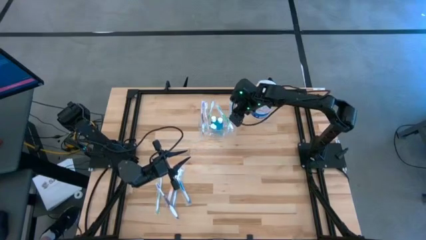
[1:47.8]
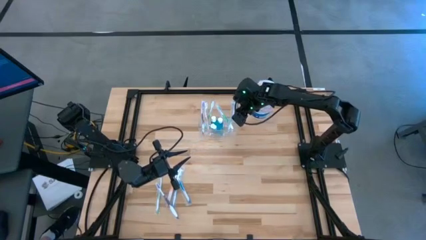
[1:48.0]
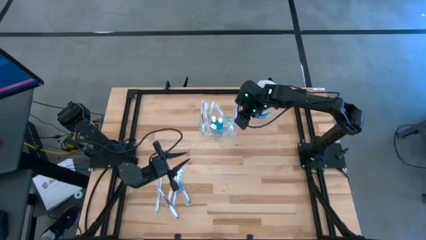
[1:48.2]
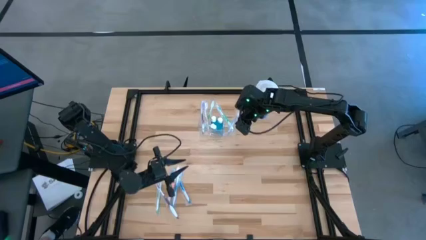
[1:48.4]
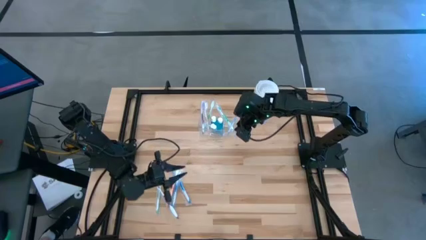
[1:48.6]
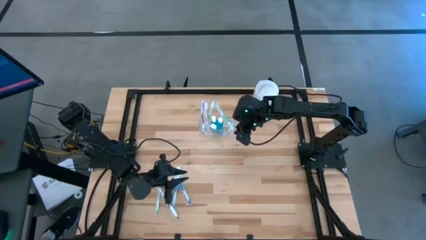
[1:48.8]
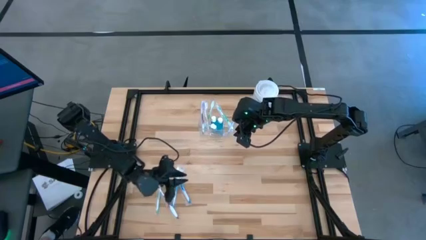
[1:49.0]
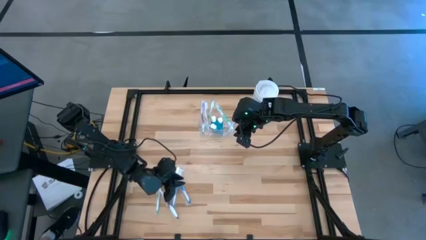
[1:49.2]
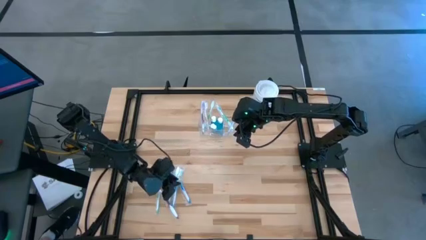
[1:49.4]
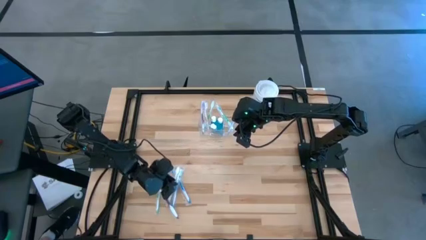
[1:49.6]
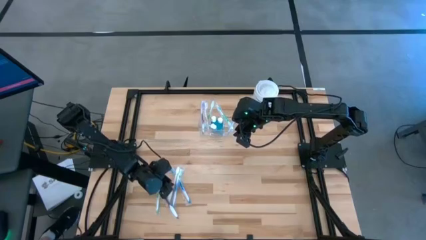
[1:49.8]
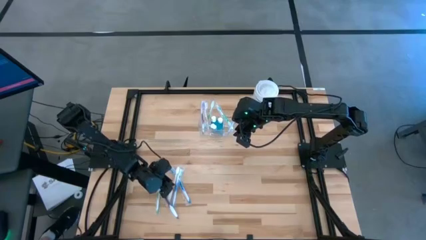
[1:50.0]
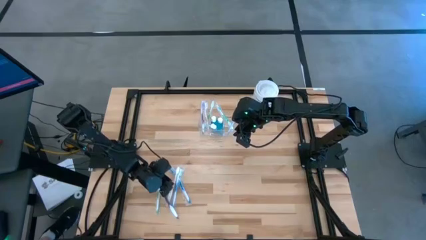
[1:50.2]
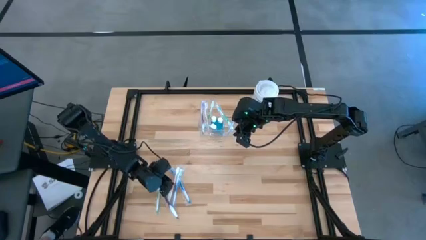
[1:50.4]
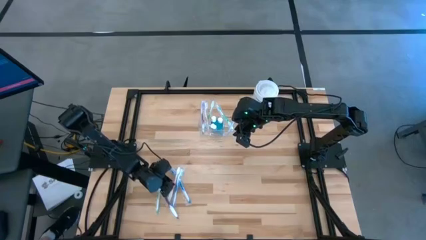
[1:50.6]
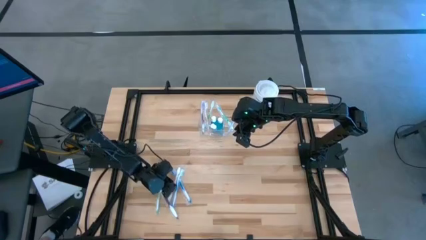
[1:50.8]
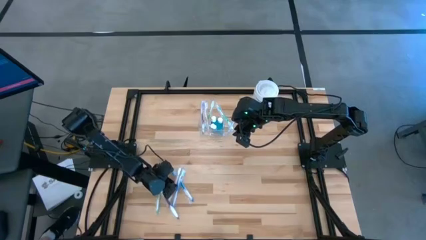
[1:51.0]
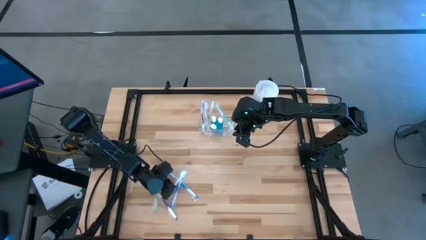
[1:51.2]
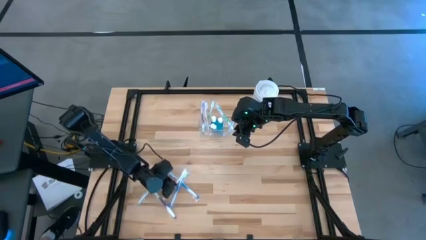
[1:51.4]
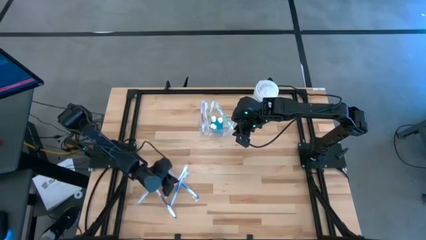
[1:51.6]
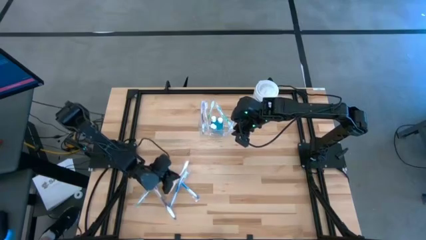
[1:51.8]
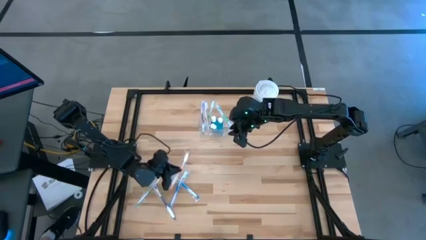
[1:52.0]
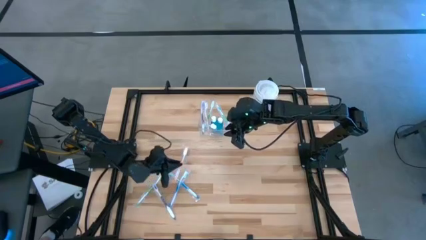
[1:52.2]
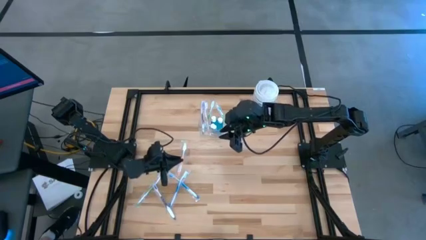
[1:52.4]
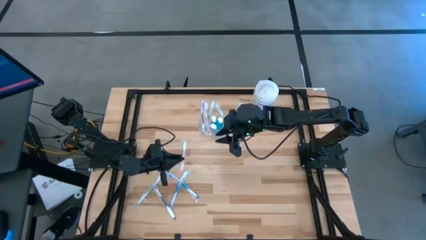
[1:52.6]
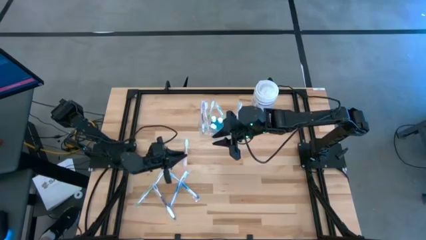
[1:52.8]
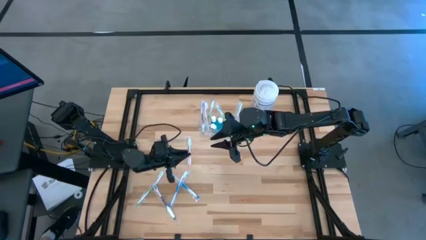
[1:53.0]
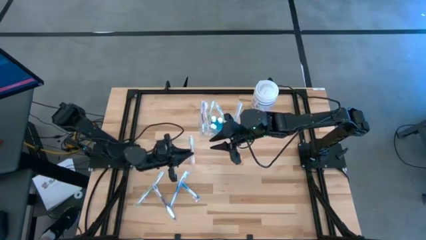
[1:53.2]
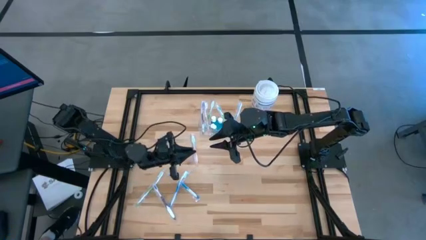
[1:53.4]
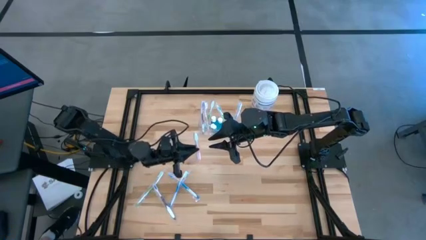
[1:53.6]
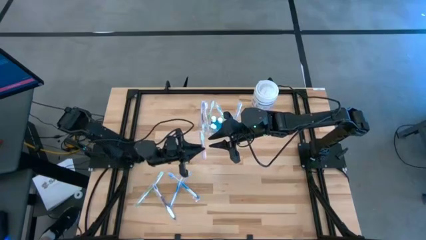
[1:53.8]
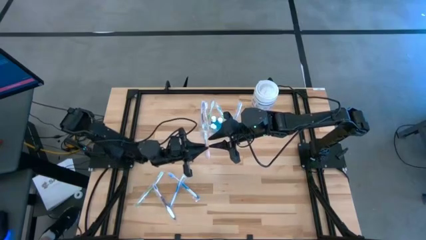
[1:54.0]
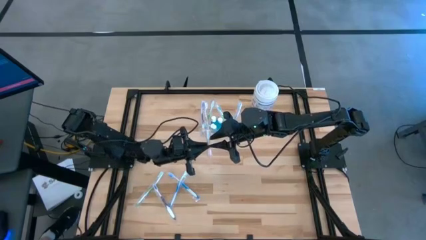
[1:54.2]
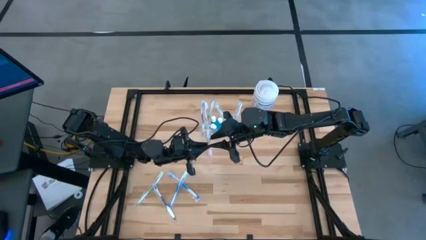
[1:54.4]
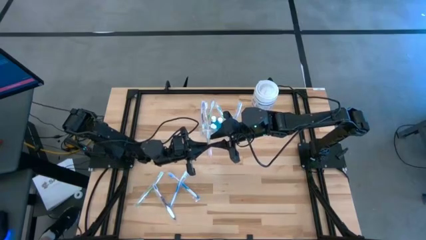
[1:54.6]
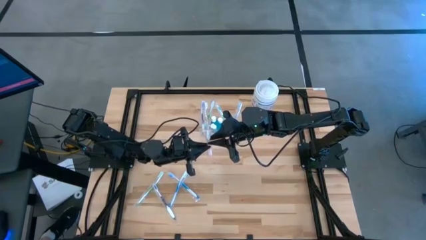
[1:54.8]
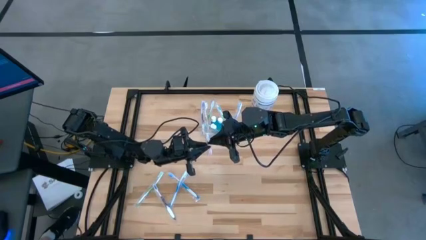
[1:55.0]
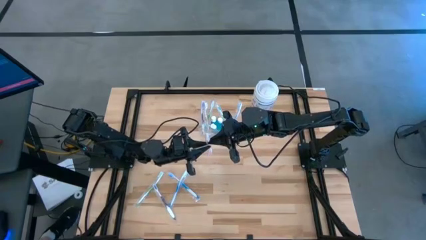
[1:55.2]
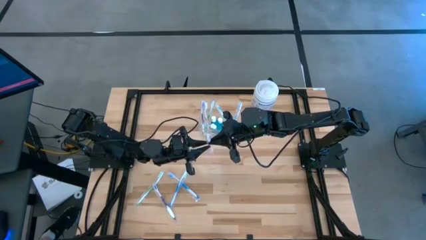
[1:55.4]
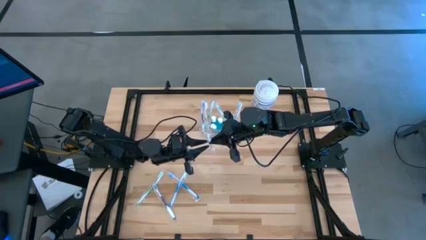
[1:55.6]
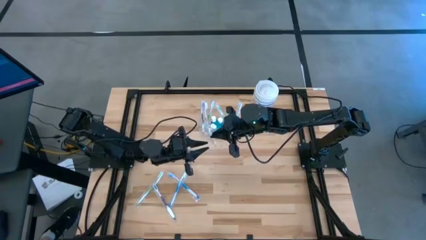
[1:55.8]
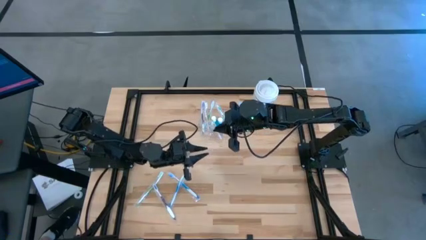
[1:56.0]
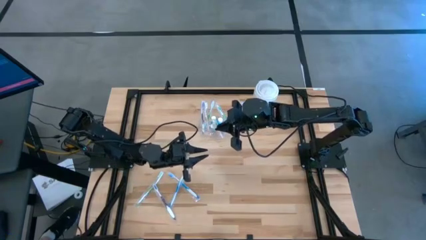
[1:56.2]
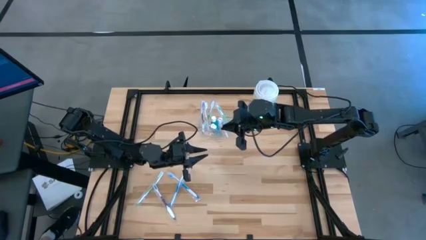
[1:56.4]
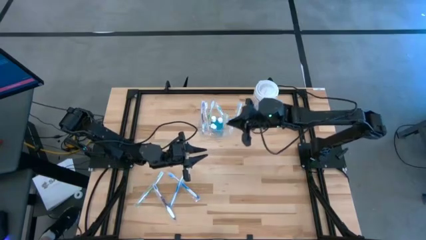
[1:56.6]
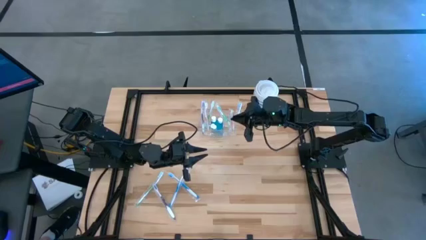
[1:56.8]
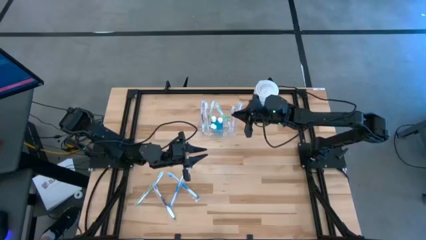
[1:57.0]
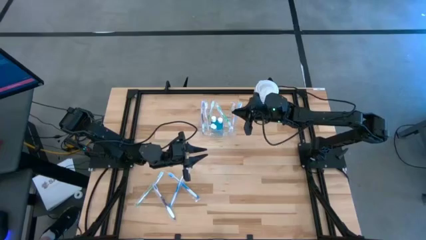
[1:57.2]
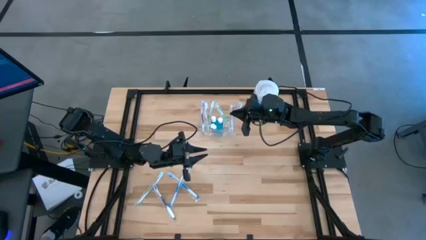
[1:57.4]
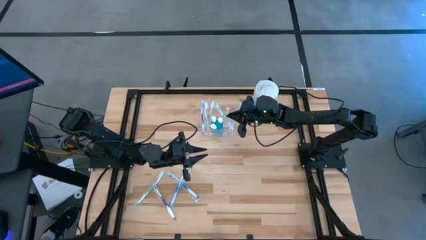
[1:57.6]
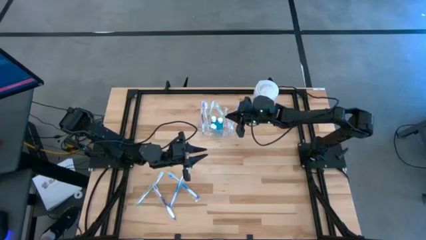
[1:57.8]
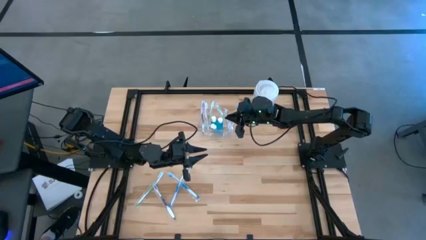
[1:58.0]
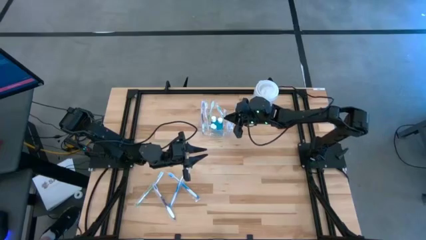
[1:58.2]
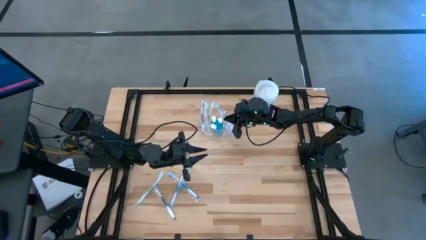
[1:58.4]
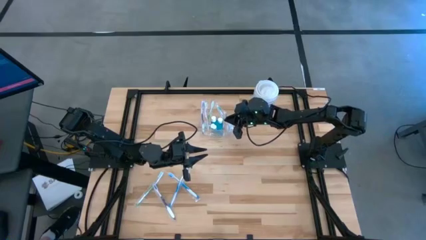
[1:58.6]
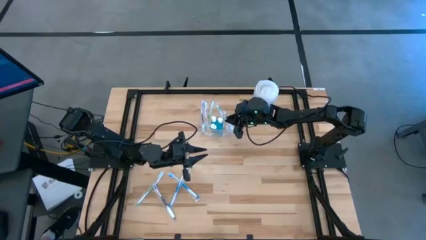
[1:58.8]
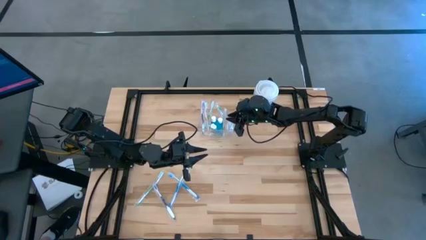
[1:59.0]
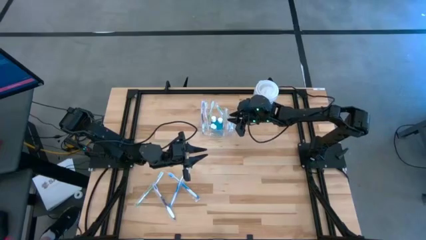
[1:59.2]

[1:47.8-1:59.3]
Task: Pick & Place toothbrushing station
Put the orange toothbrush into the transparent organizer

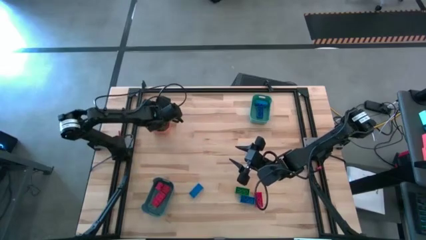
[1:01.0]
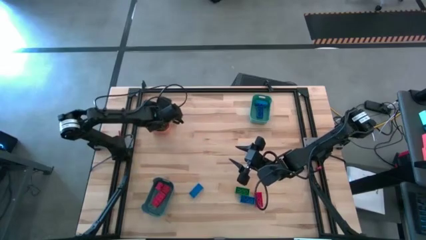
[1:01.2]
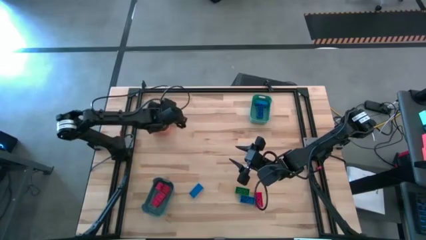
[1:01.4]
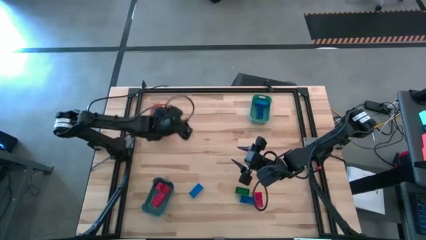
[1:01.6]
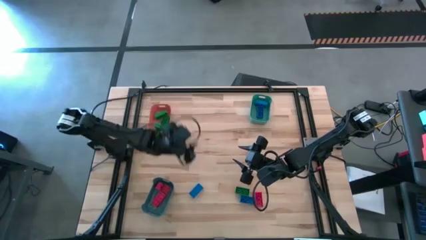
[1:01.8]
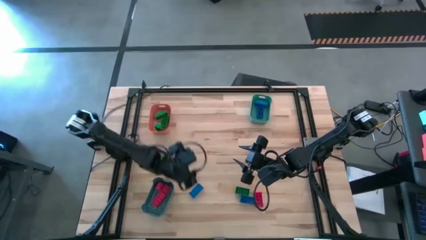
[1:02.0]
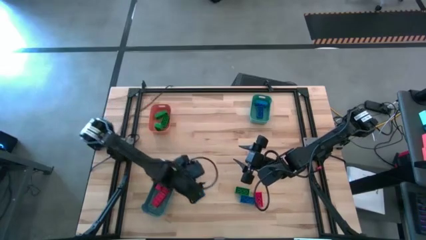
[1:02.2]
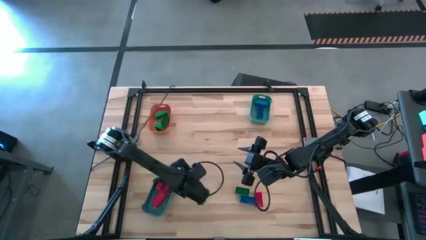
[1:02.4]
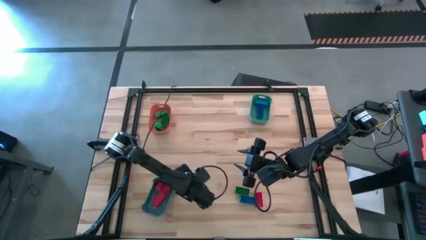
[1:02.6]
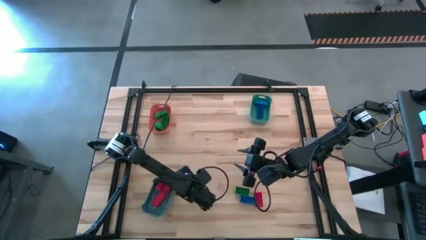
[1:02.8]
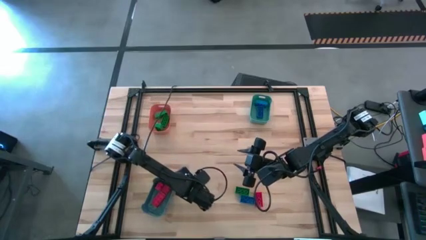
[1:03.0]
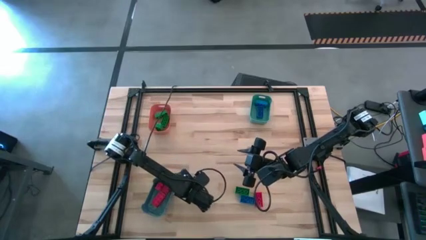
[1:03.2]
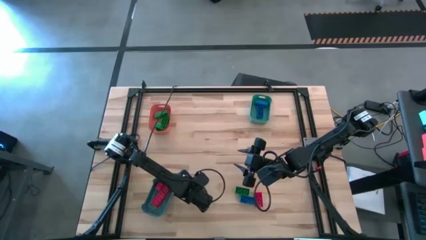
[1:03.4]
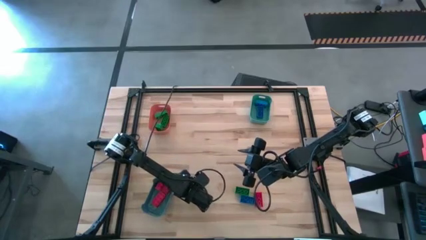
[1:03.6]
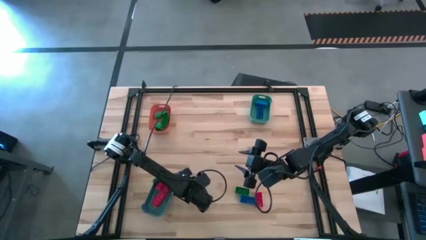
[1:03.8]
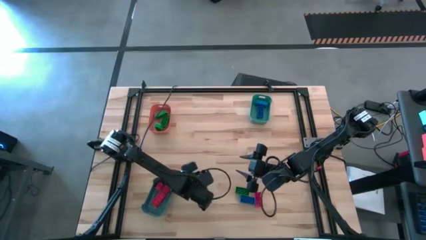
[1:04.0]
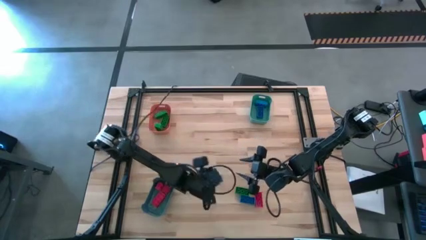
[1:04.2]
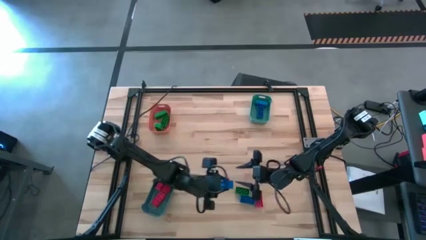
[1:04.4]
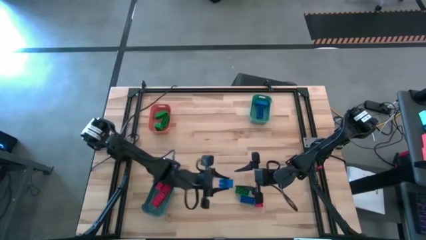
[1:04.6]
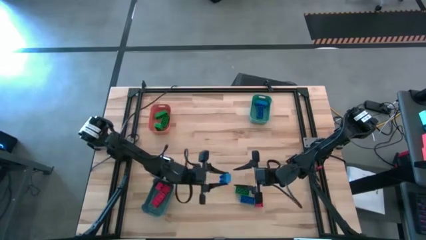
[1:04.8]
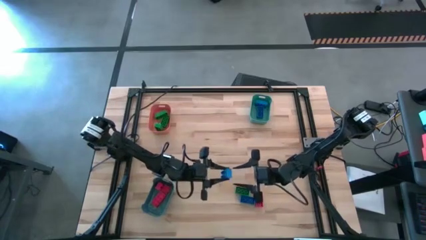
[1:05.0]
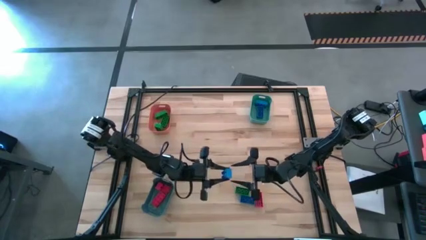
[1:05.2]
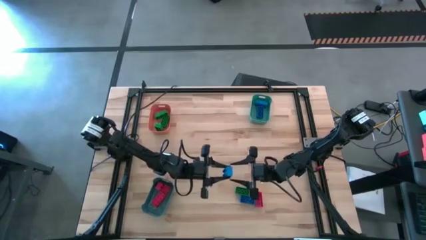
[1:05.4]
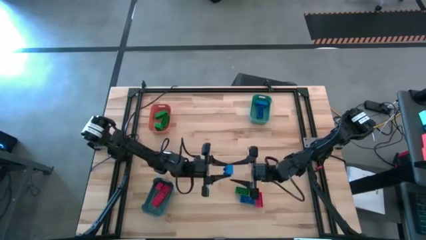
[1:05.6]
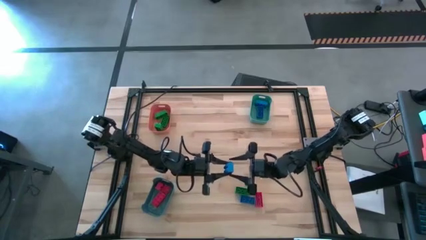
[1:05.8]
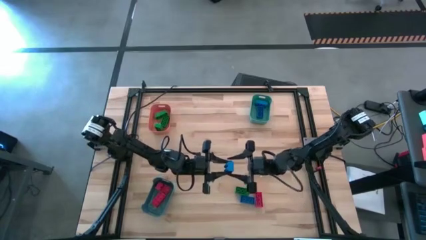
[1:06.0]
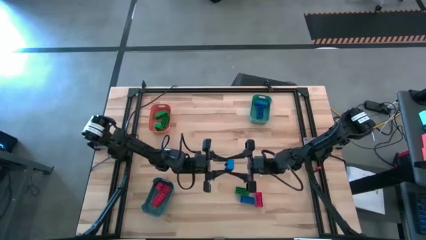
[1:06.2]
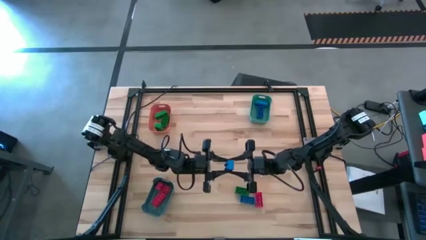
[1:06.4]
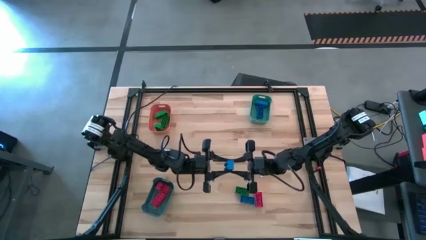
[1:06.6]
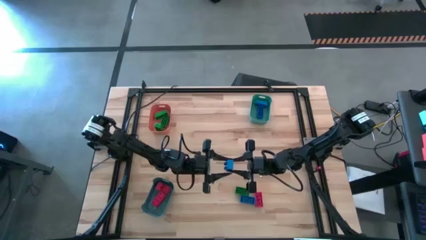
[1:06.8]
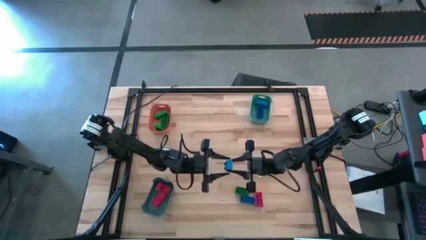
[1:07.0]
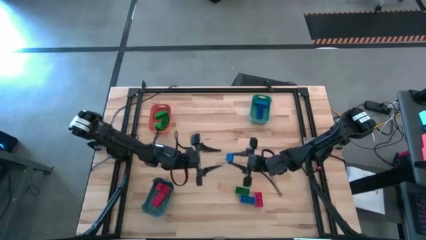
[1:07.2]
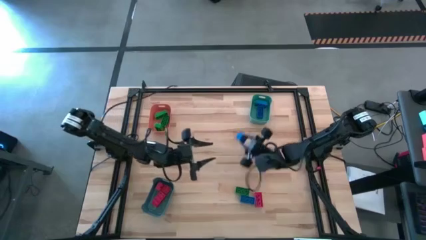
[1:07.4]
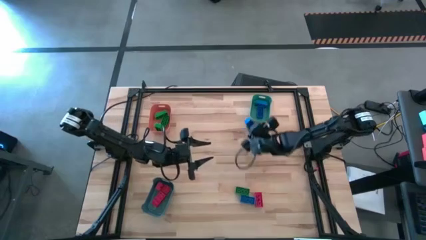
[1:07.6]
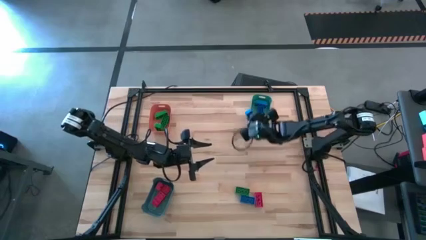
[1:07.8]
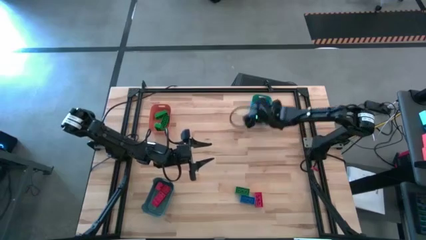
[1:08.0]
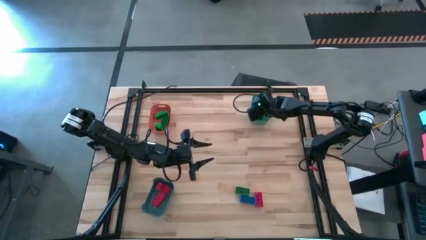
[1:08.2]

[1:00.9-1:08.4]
Task: Sort & place blocks by color
Put the blue game piece into the green bin
